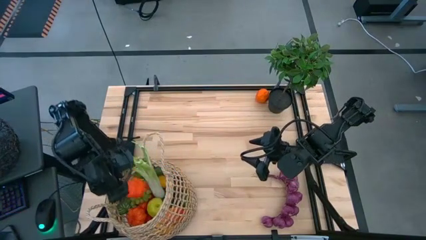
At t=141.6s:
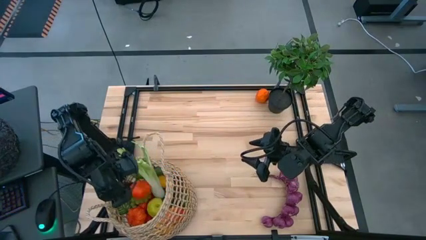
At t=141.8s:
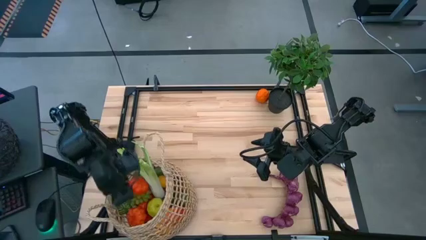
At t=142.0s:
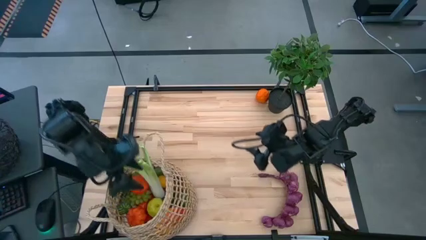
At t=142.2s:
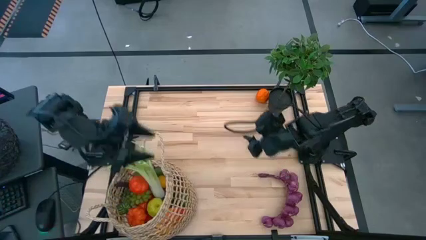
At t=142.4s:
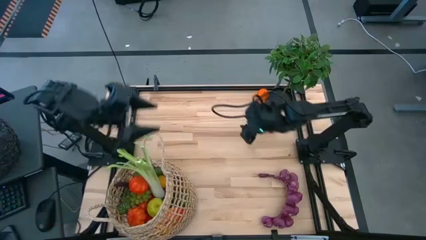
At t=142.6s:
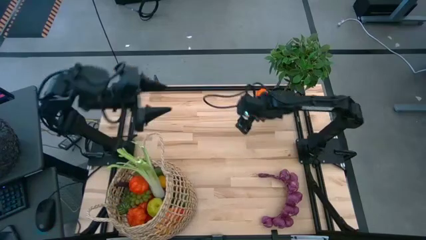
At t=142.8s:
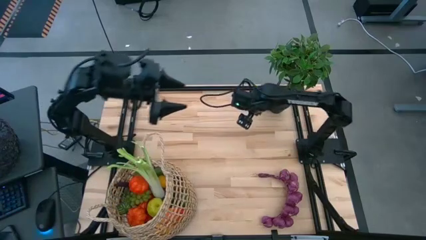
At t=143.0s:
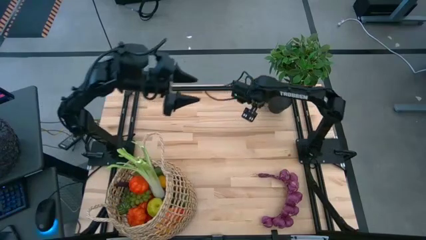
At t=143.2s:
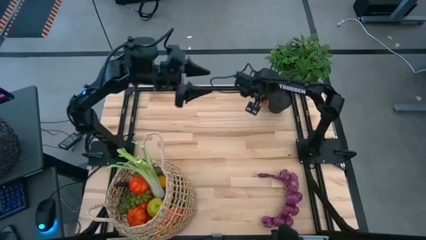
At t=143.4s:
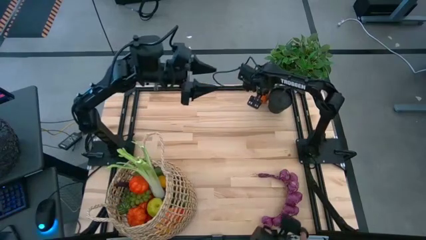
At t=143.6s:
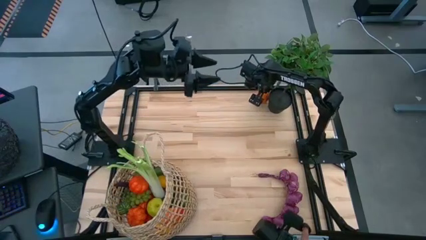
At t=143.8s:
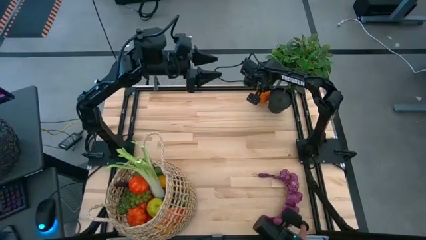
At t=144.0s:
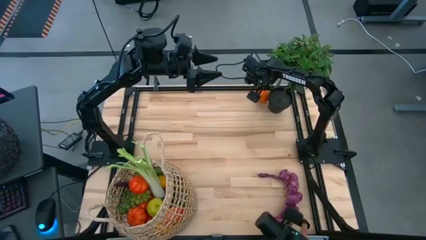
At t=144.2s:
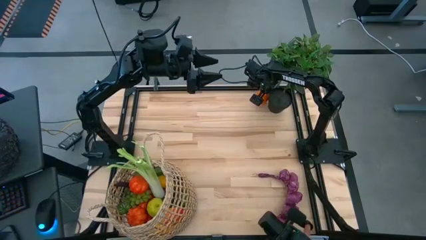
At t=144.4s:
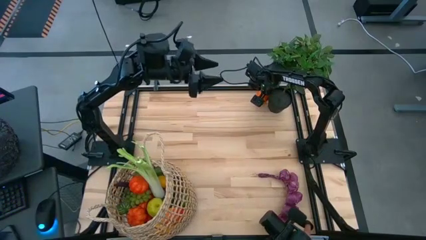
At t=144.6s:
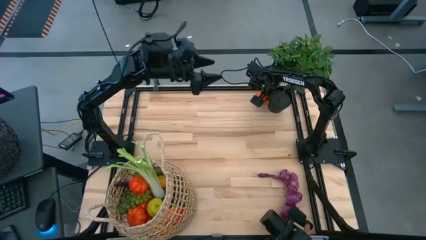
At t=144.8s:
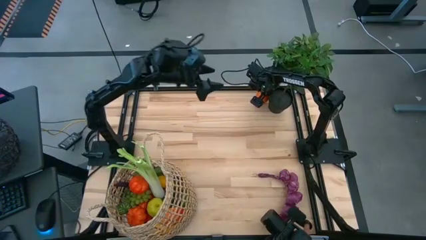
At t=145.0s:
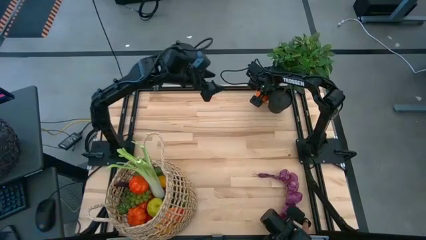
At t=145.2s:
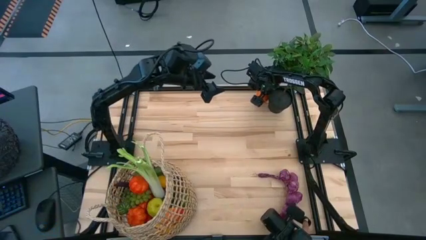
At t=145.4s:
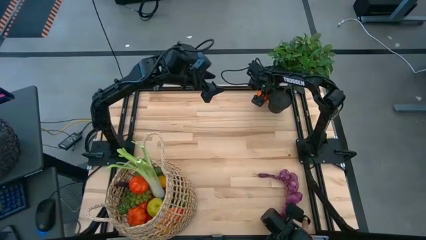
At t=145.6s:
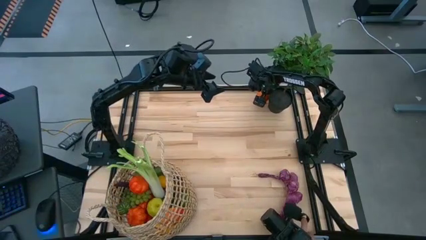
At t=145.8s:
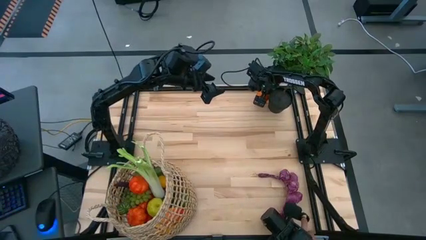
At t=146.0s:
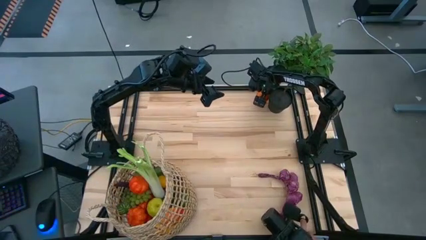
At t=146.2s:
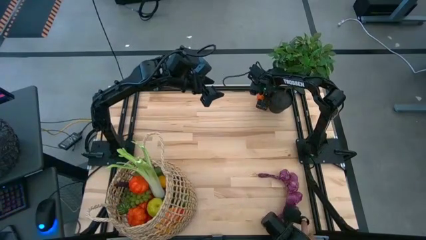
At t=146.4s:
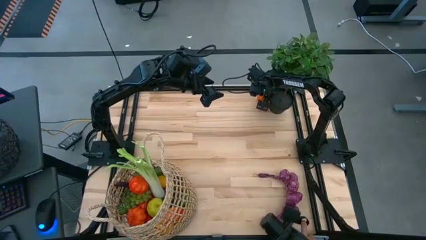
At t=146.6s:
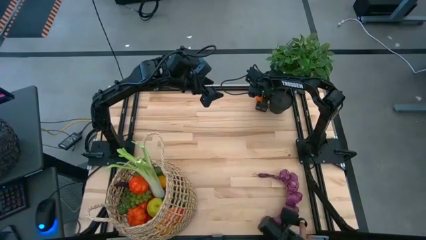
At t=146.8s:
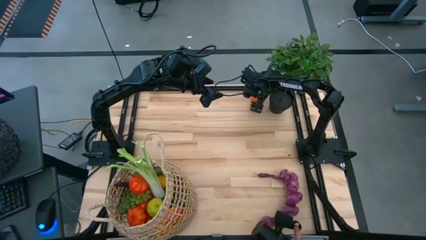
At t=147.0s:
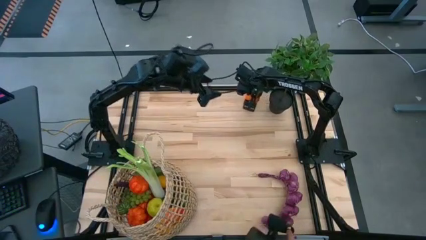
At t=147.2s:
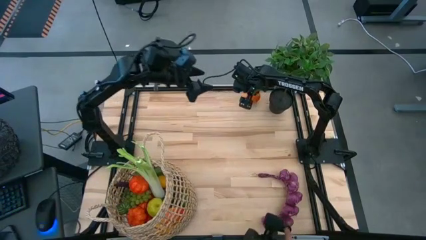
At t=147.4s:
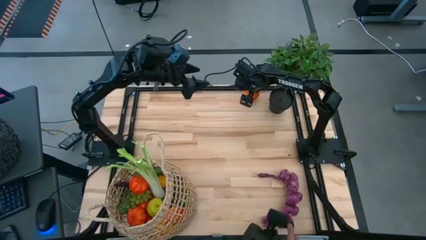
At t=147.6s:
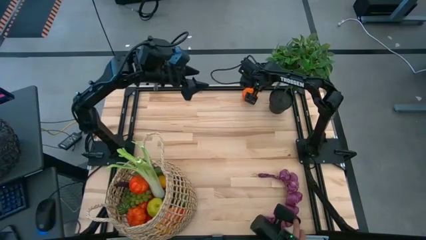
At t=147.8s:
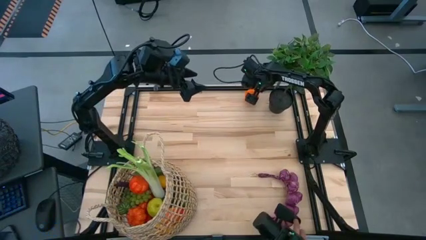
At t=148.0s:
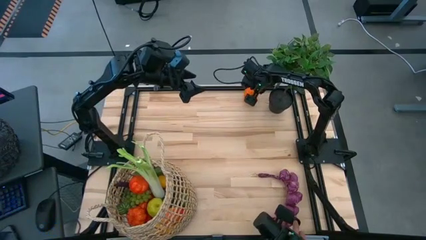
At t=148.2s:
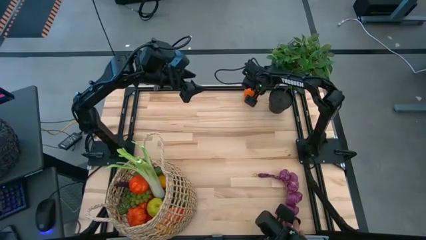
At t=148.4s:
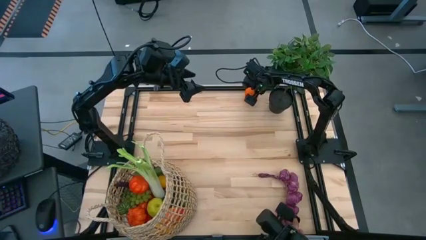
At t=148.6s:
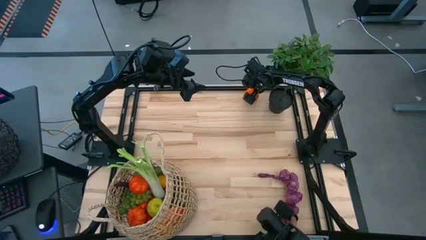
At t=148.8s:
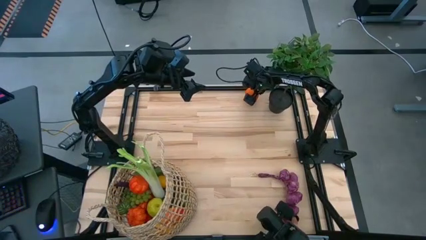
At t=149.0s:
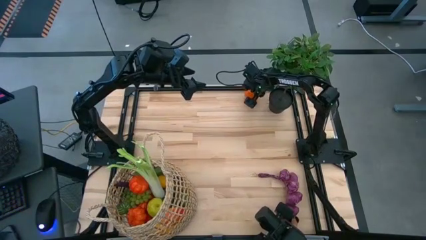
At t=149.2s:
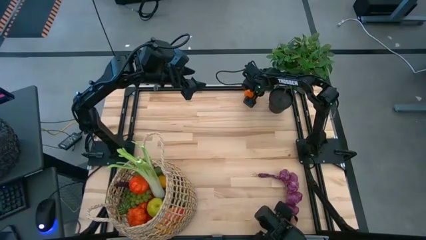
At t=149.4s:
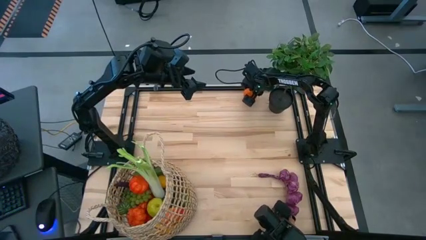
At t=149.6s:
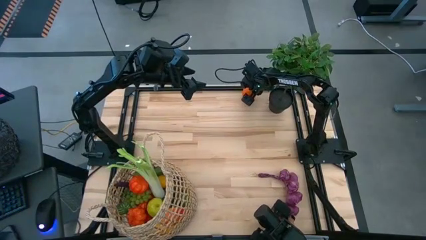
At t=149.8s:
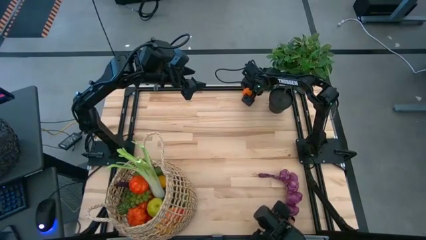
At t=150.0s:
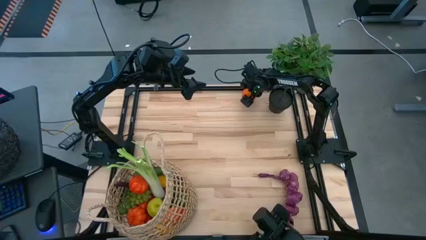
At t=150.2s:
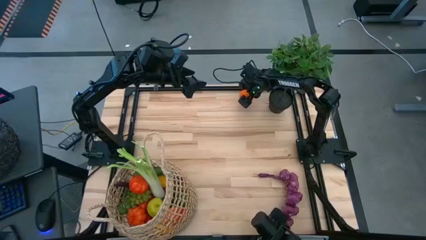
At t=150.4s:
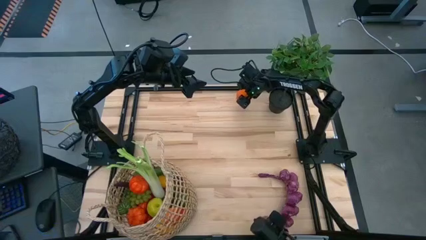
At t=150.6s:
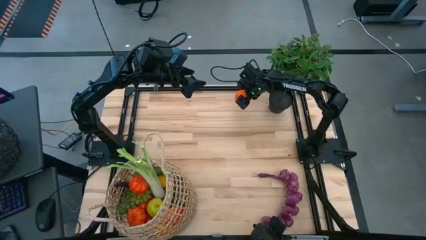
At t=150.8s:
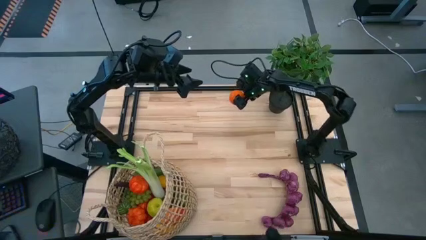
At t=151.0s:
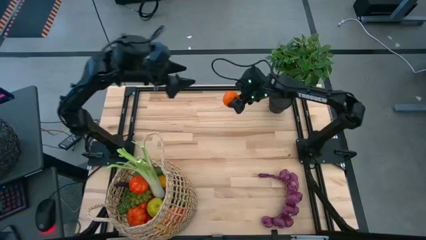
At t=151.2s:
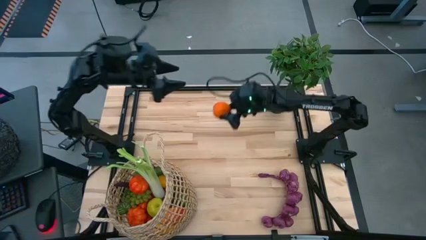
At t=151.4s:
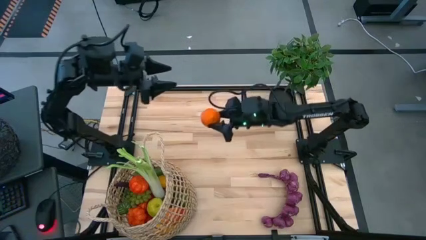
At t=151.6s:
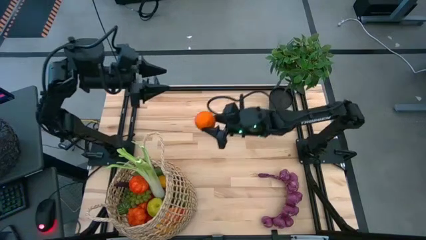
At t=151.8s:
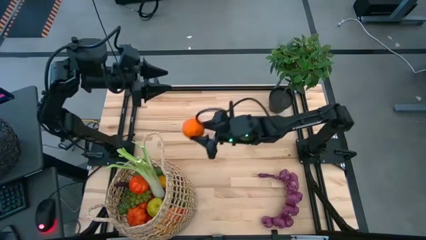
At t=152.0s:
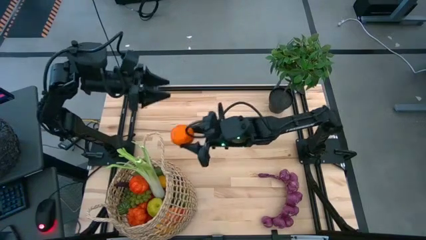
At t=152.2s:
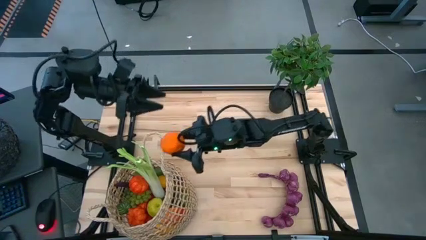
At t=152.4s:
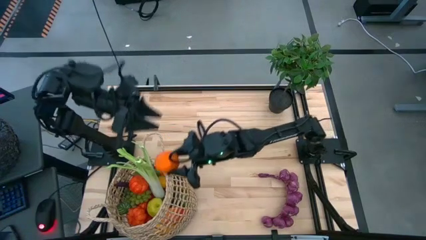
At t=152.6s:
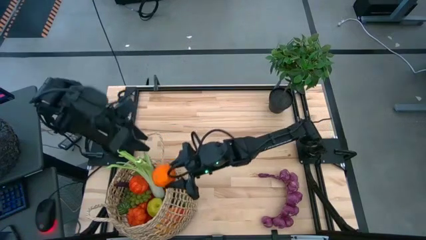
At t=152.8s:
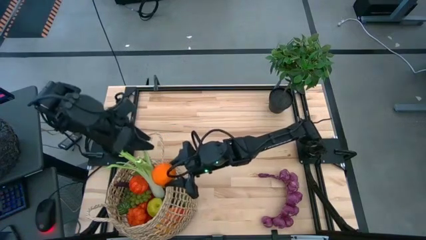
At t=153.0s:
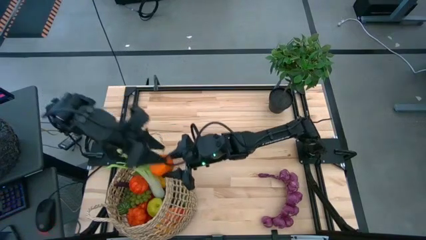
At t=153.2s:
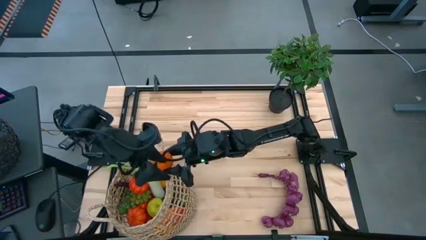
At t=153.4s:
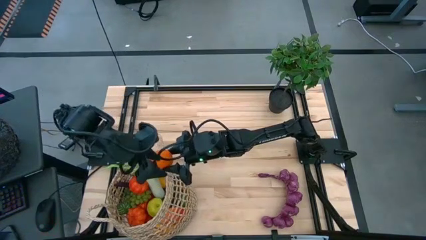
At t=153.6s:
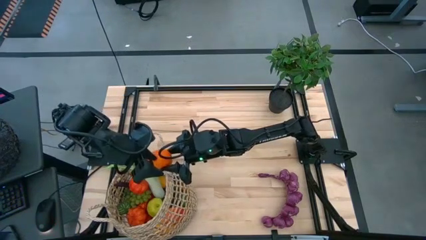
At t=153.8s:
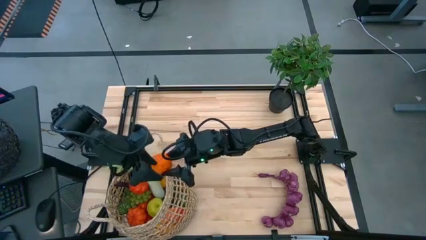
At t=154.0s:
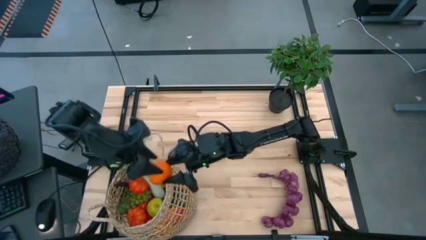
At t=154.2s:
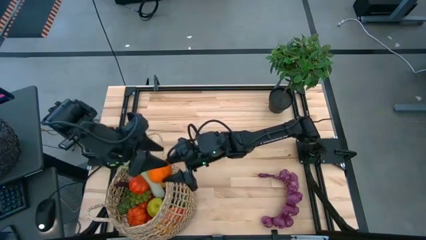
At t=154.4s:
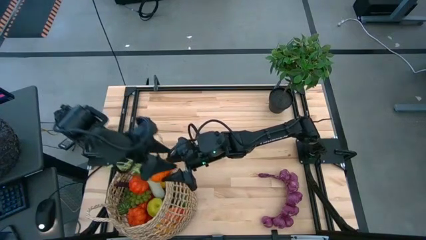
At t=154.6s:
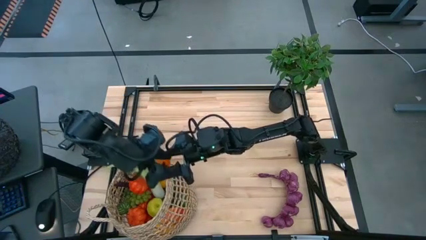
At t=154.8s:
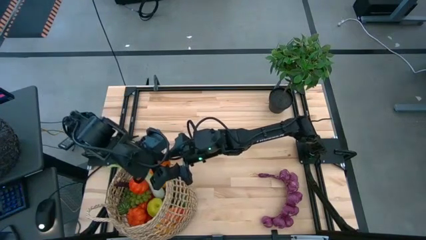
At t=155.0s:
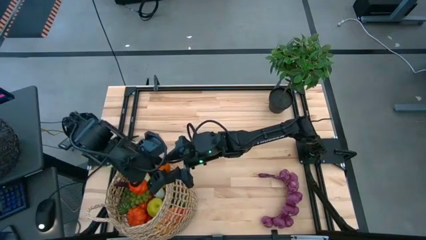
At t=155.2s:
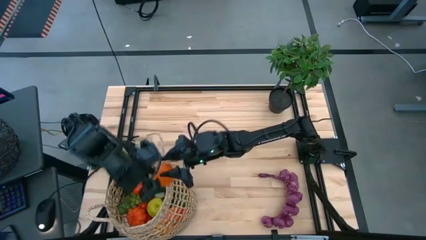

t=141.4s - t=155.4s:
Task: Build produce basket
Put the orange into the basket

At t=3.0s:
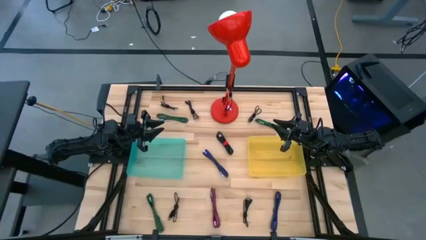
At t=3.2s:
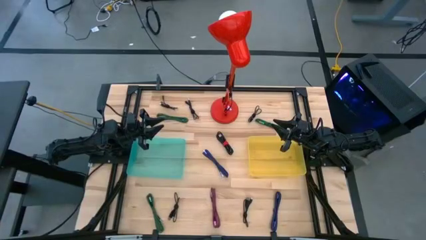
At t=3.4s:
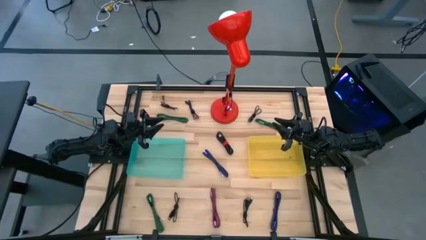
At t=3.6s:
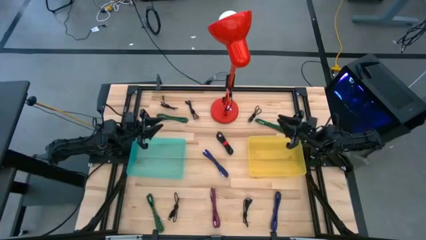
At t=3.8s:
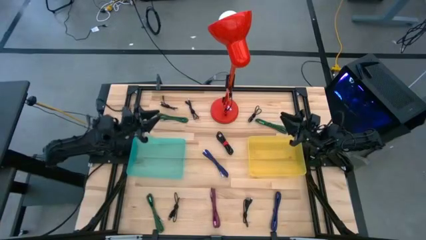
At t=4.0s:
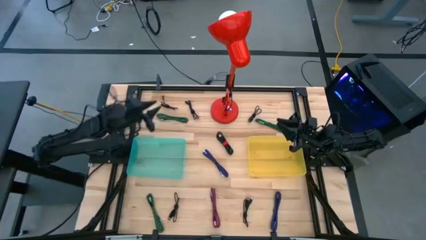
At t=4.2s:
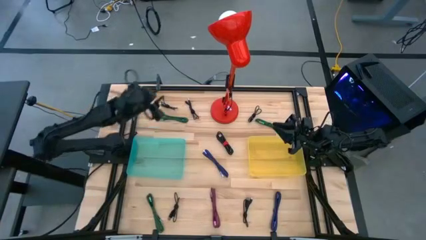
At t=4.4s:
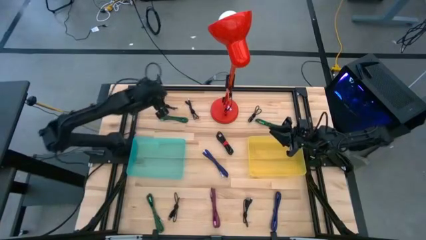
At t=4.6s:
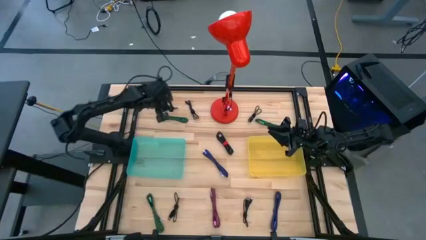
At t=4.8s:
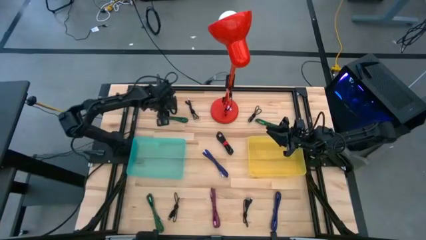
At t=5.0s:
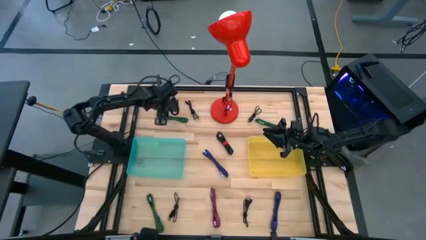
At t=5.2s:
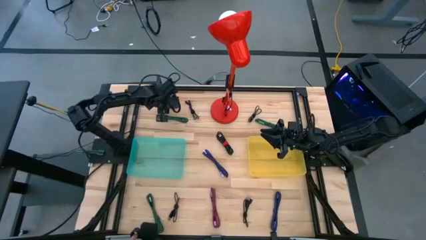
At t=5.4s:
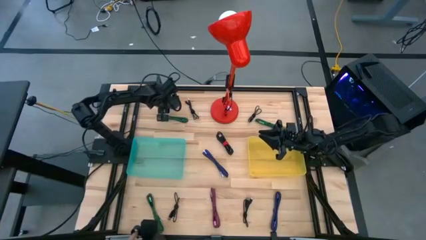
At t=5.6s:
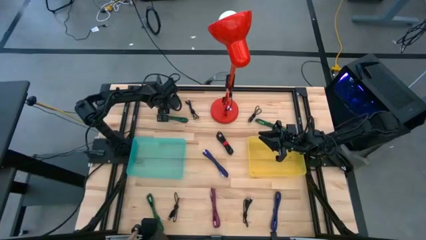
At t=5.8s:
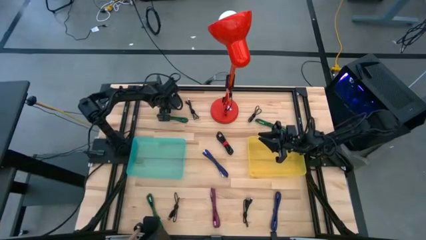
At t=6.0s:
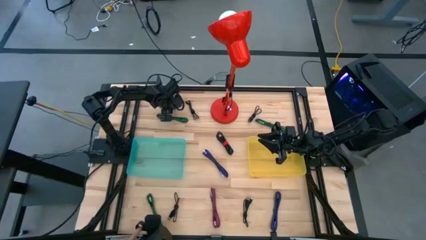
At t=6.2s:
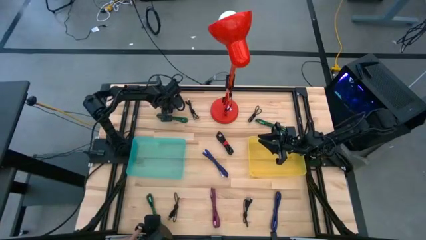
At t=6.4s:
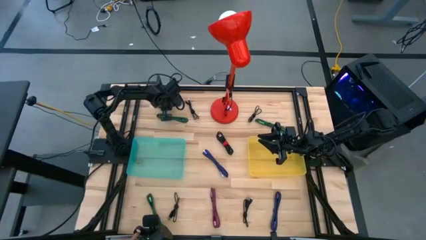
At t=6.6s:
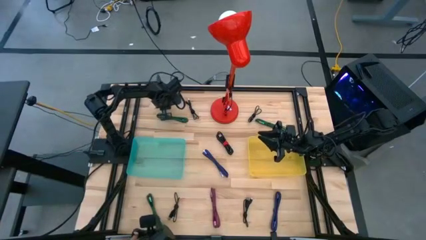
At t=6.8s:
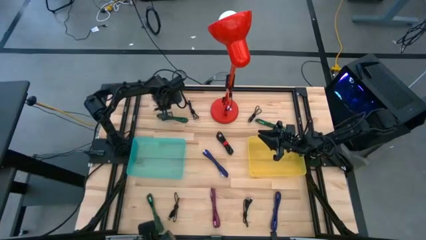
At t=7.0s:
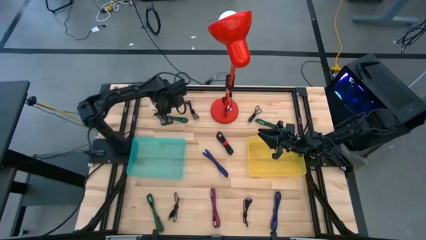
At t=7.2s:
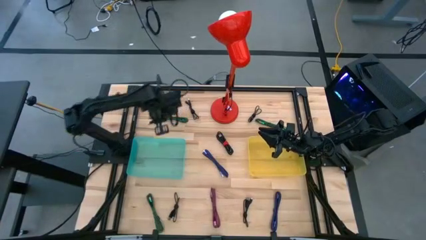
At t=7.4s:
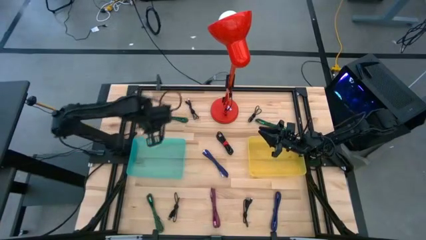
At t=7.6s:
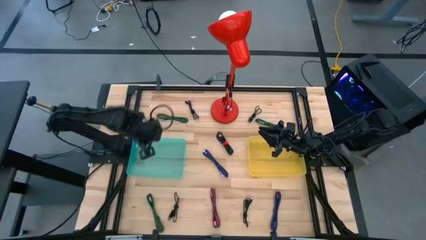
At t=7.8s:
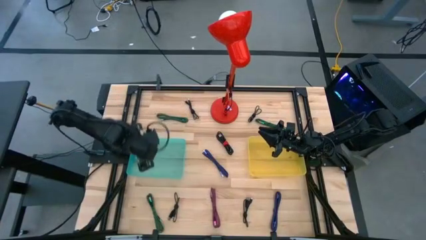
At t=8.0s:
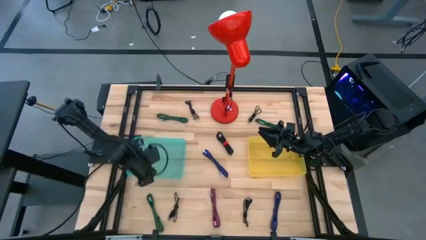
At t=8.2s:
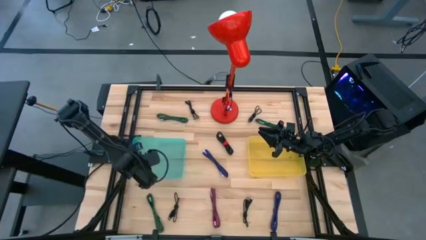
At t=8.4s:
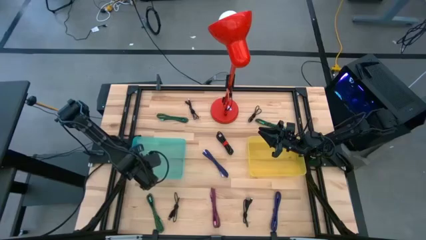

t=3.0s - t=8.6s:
Task: Pick & Place USB Port
Put the black charger cable into the green bin
